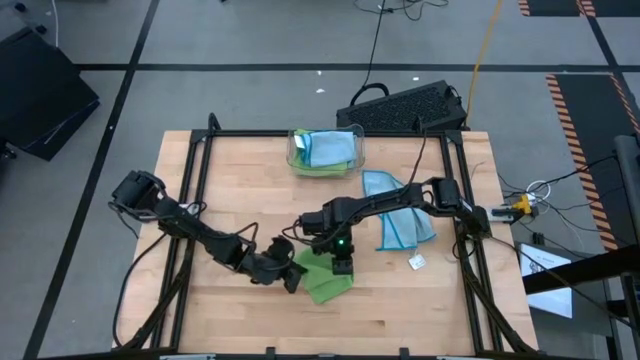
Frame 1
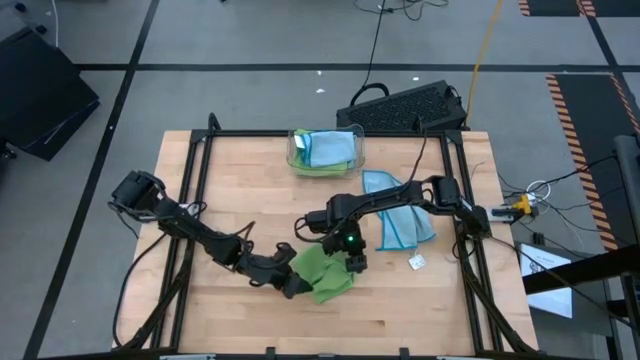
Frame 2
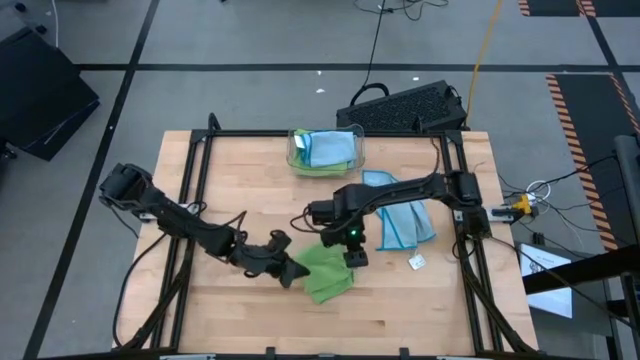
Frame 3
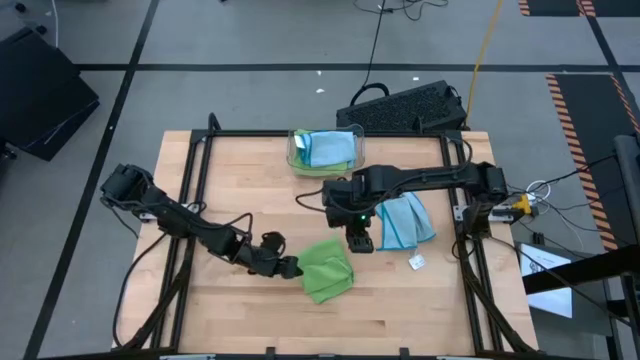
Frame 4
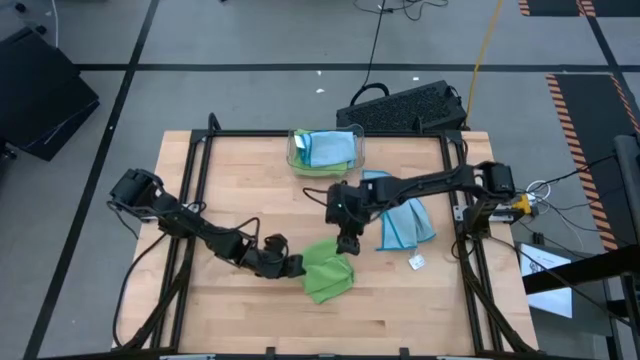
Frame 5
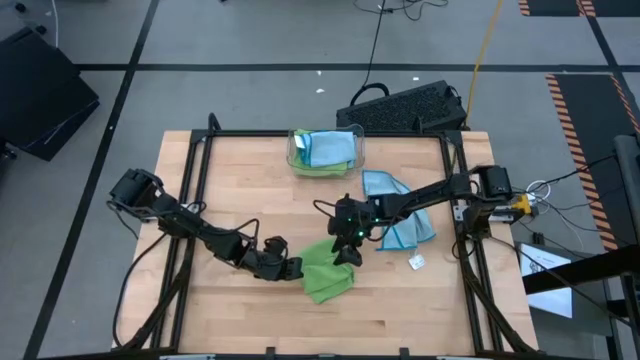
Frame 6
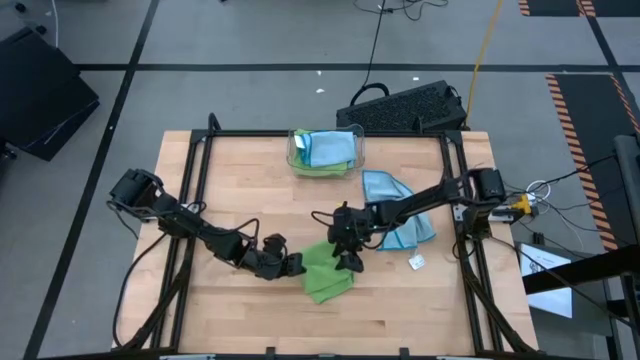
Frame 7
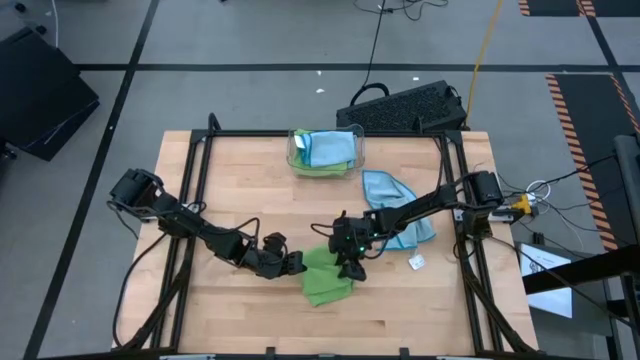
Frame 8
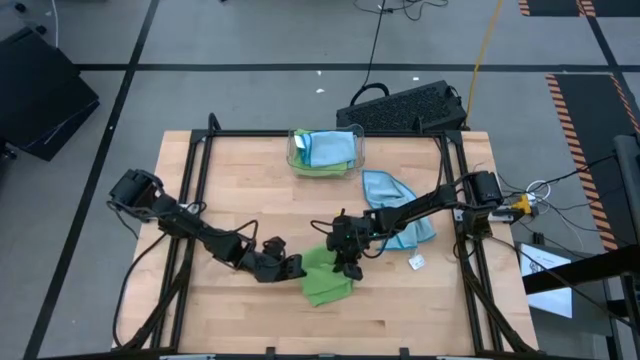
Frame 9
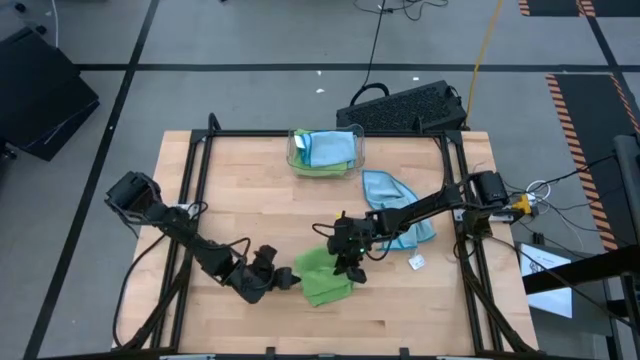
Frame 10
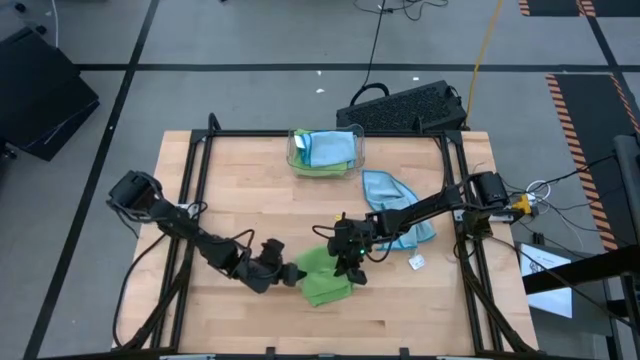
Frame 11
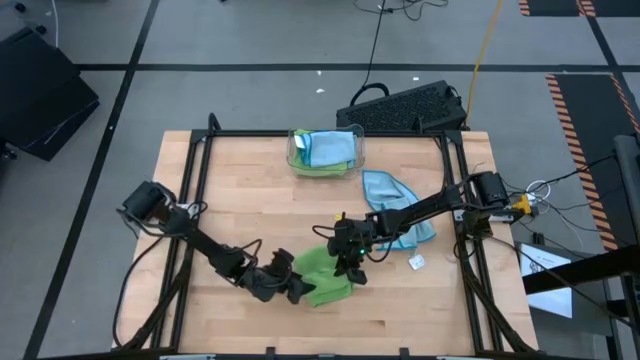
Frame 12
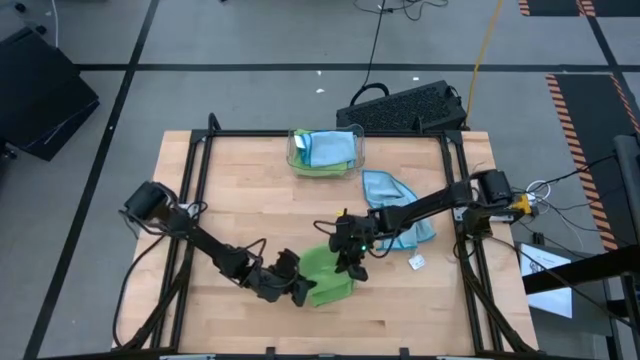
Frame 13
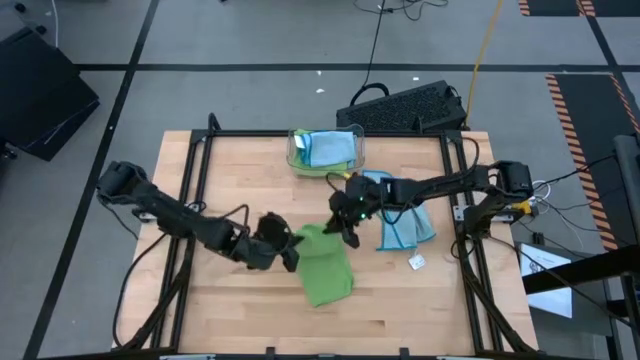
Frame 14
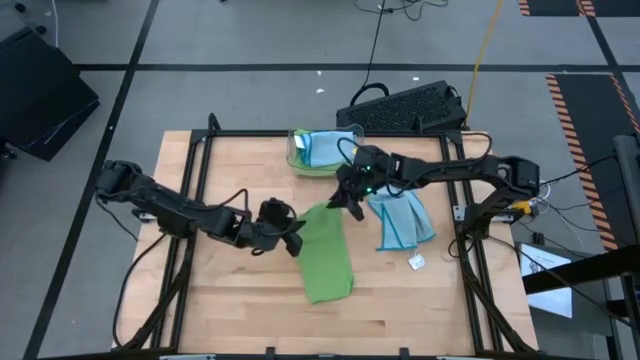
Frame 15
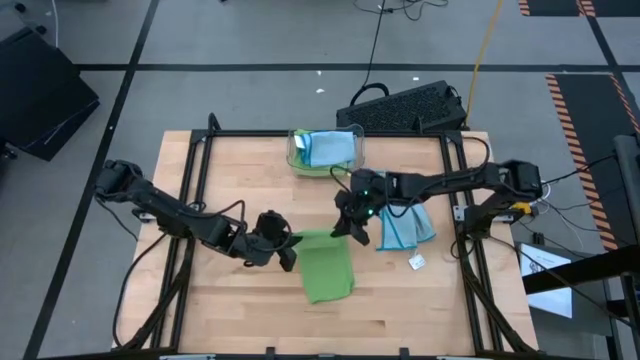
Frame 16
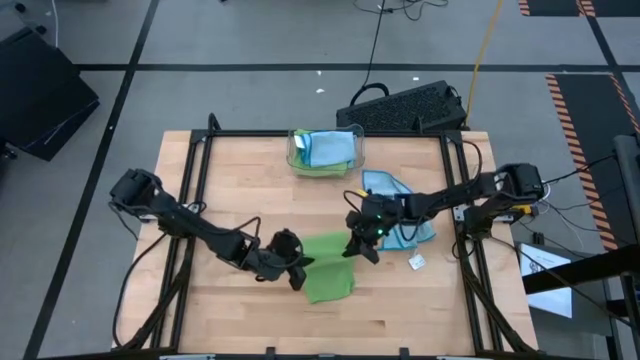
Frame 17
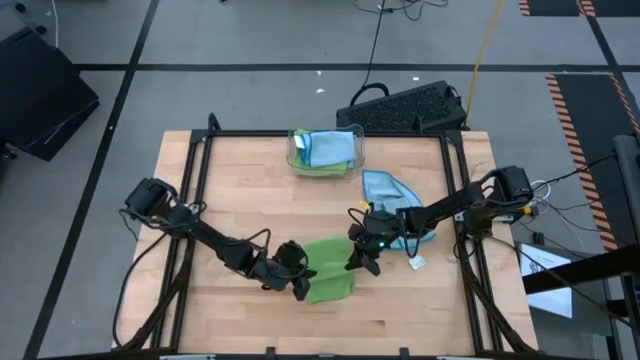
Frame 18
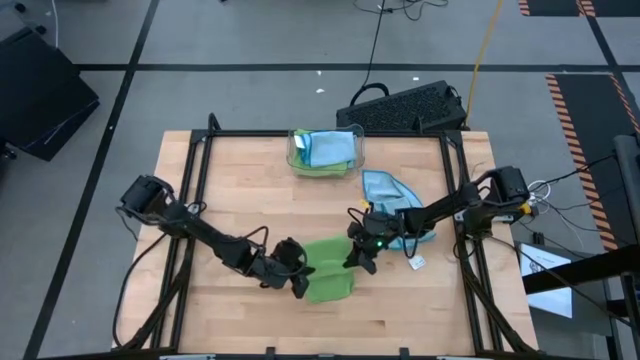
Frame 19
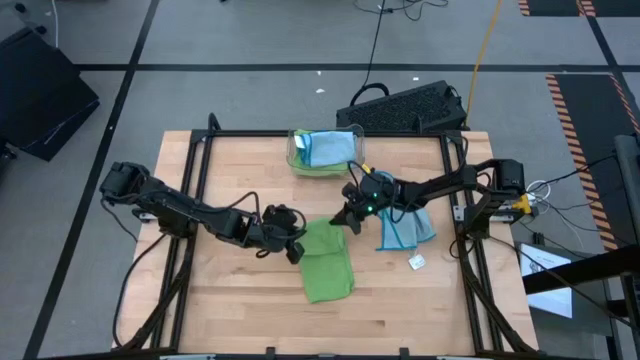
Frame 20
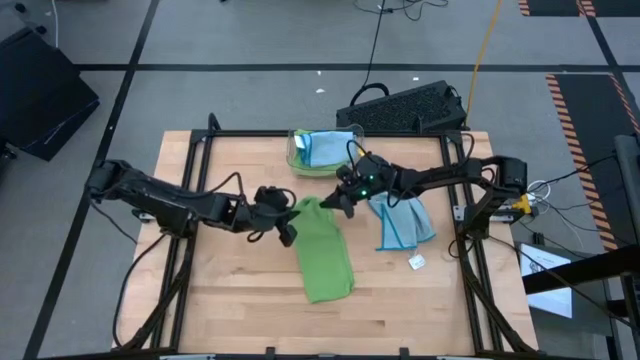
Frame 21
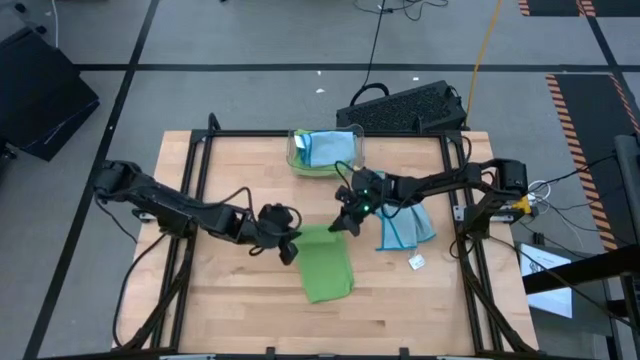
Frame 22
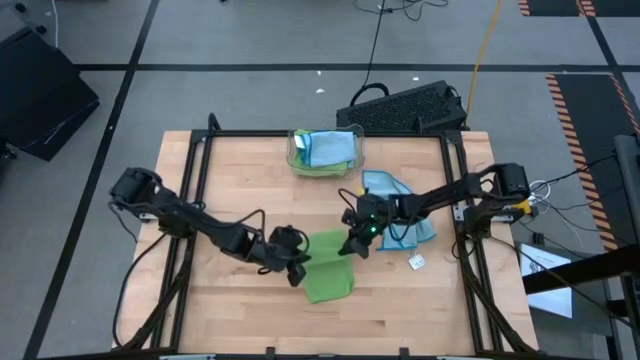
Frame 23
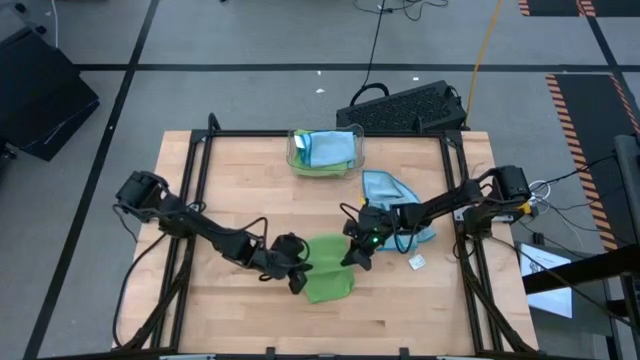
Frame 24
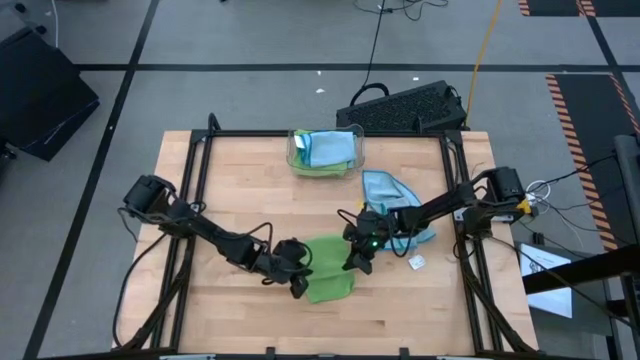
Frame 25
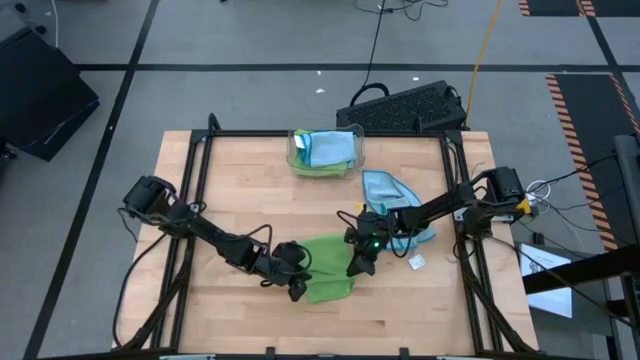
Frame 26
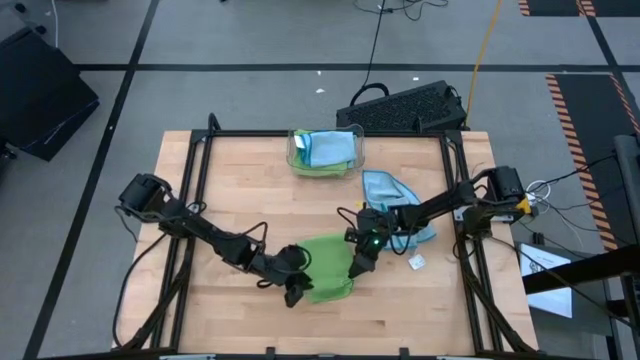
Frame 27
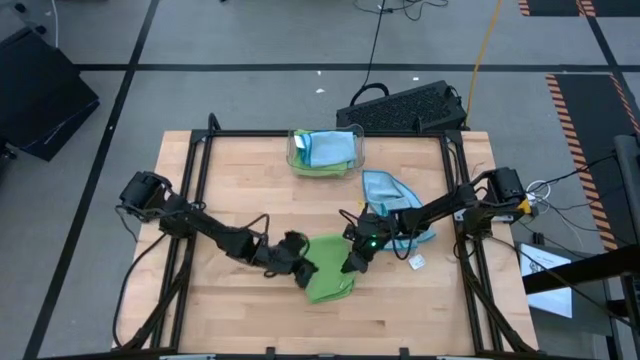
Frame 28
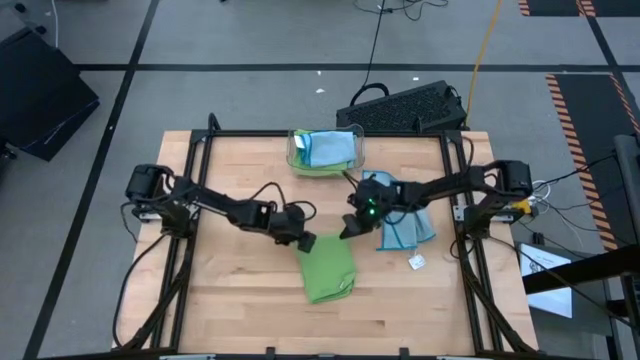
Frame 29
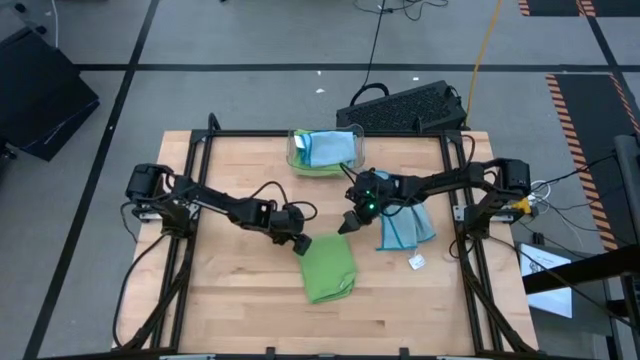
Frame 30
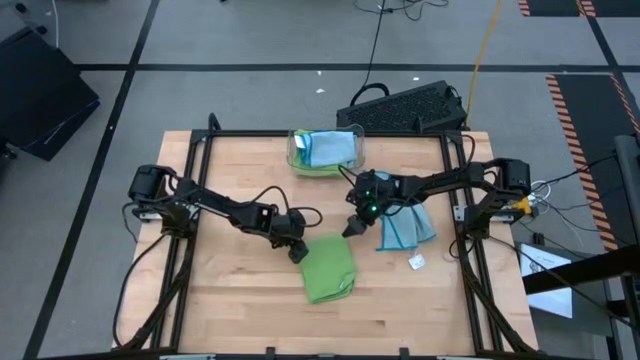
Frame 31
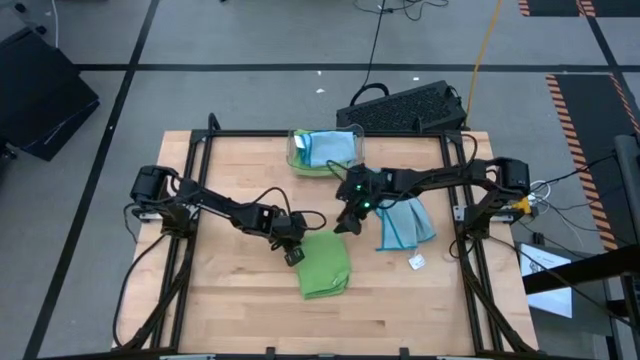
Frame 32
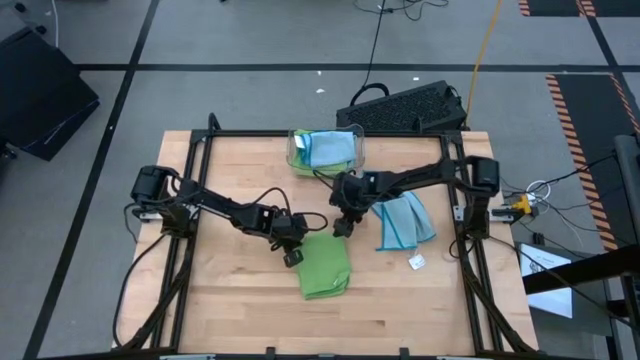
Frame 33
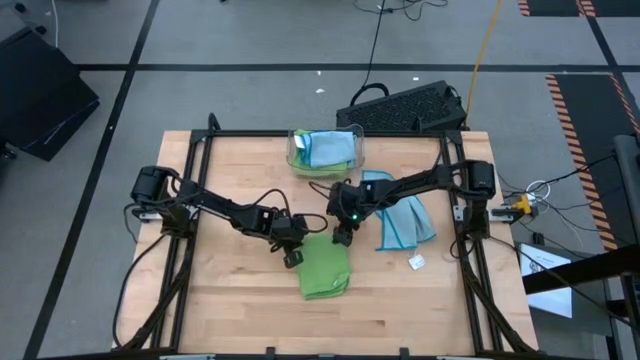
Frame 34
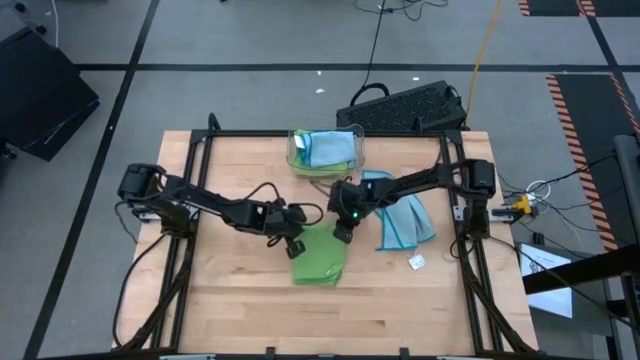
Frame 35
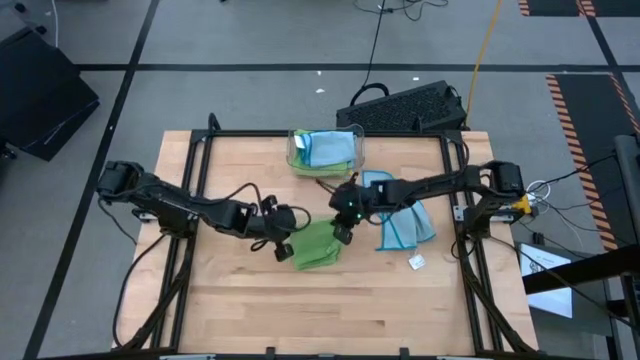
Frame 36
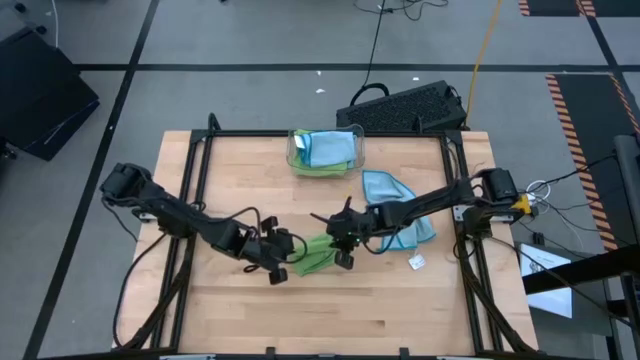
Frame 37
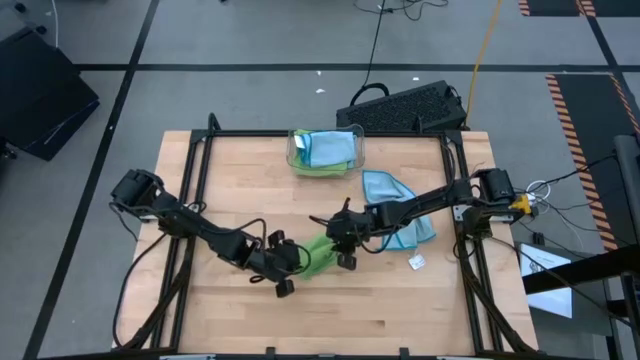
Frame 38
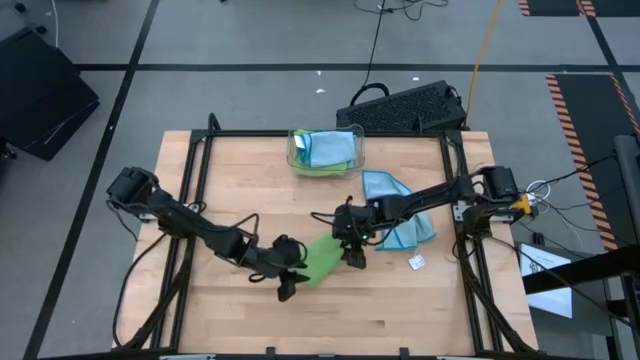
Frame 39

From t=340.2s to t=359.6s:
Task: Fold microfiber towels
Fold the green microfiber cloth

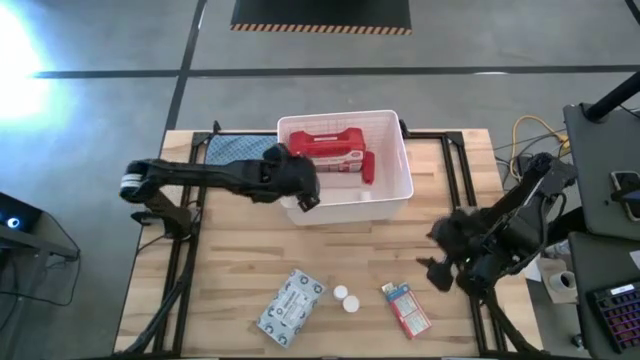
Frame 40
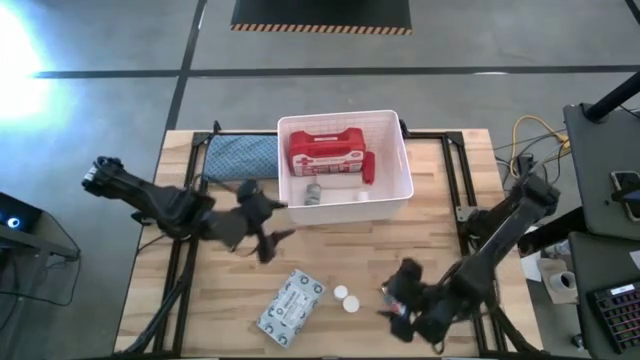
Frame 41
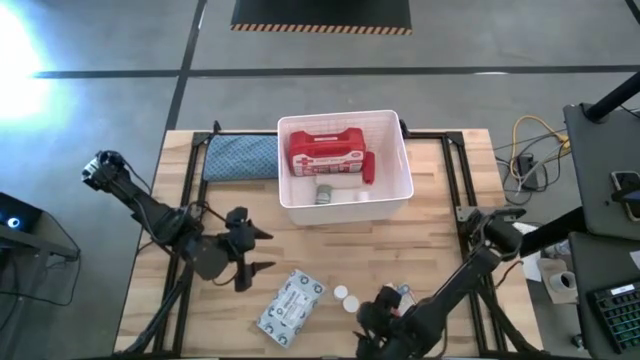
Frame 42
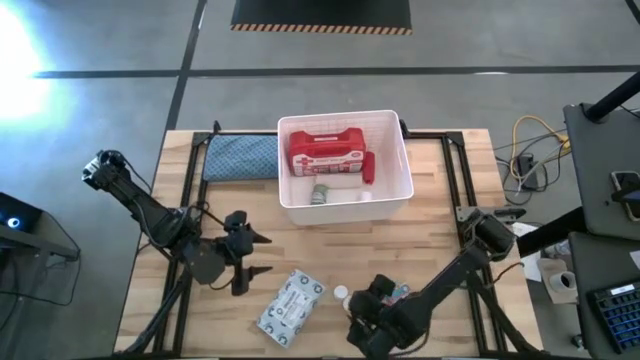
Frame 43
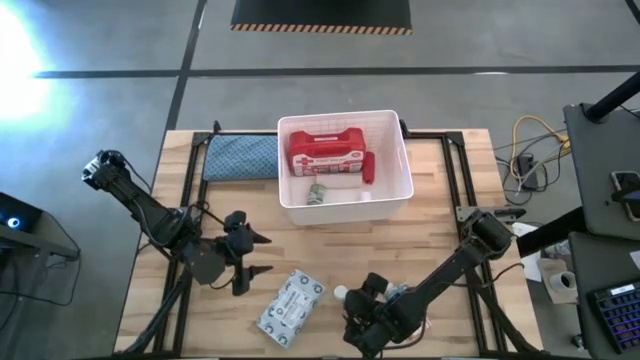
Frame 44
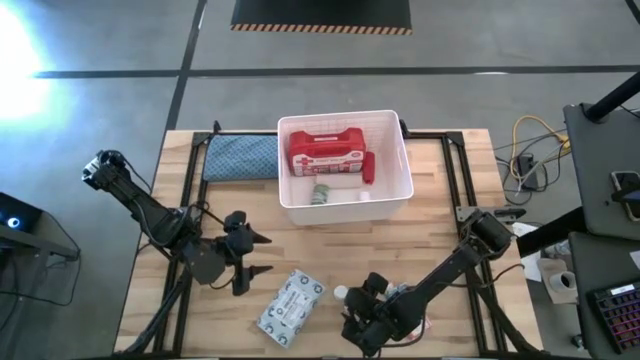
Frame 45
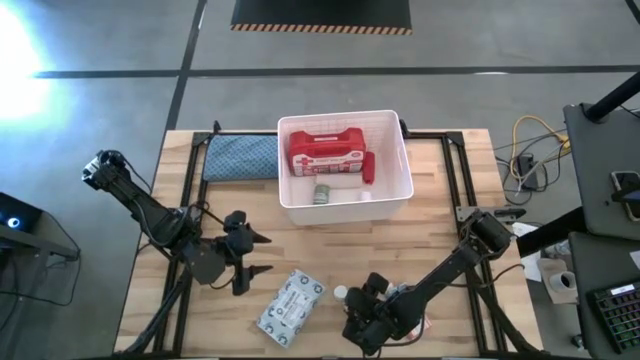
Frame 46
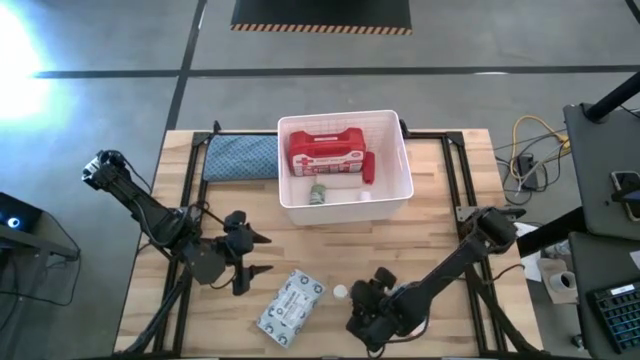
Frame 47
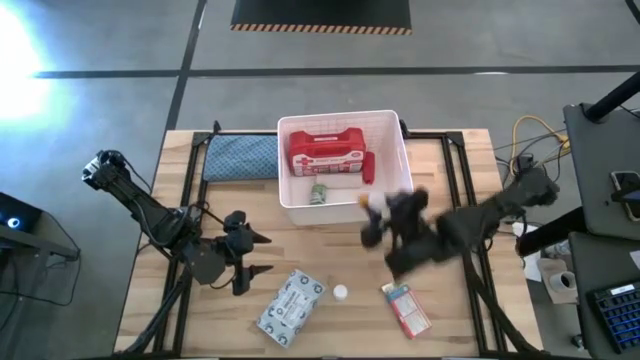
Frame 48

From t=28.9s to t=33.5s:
Task: Pick & place medical supplies in basket/bin
Put the yellow medicine bottle into the bin
